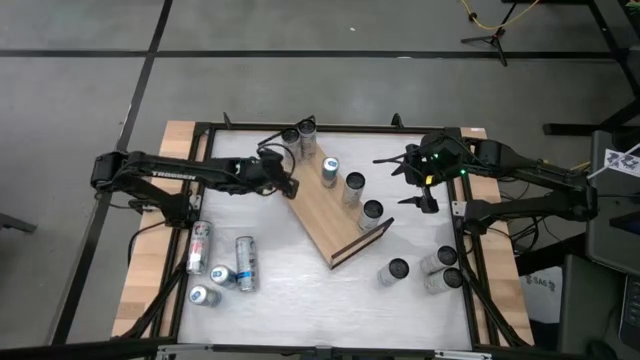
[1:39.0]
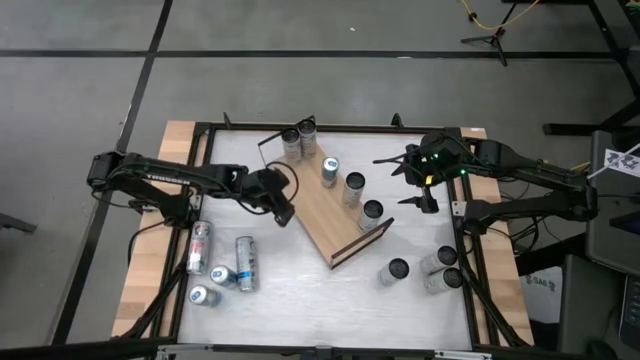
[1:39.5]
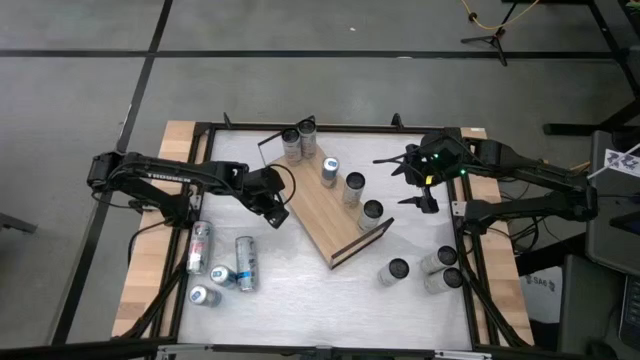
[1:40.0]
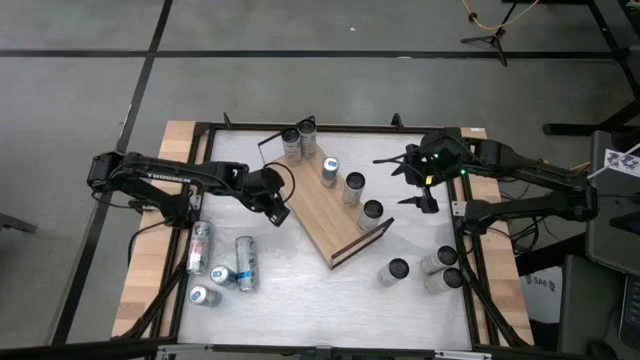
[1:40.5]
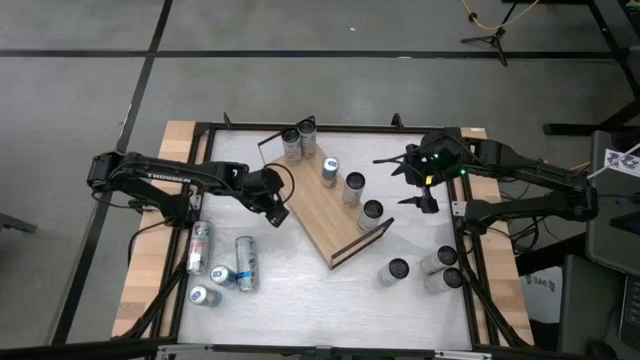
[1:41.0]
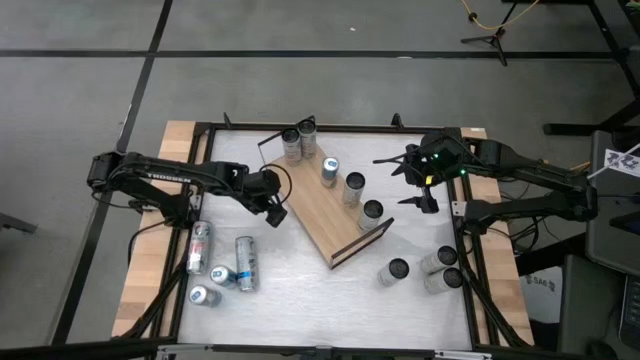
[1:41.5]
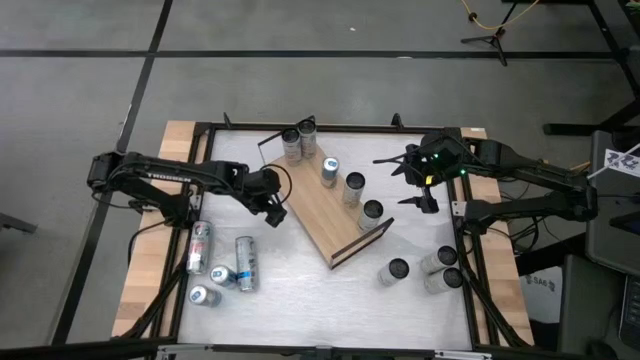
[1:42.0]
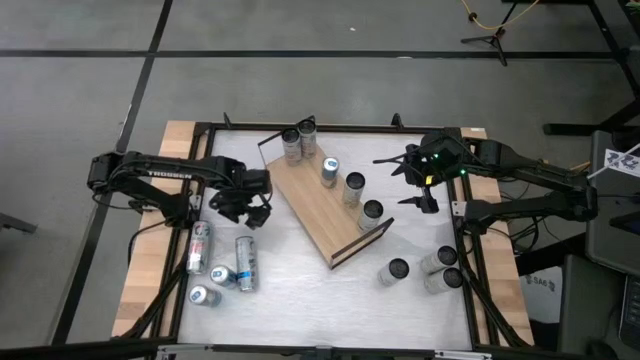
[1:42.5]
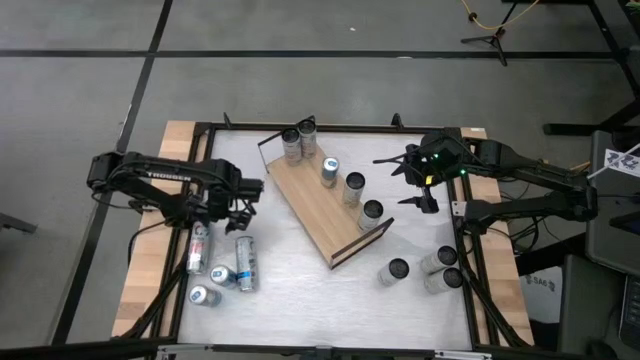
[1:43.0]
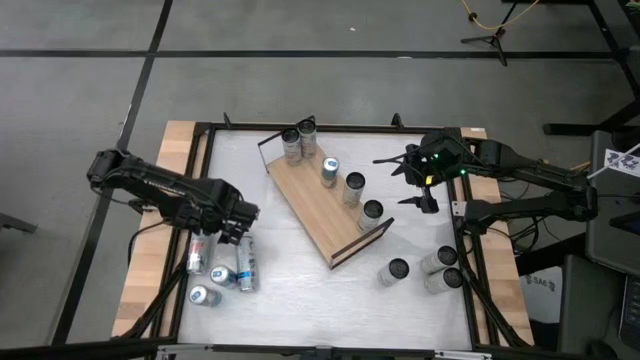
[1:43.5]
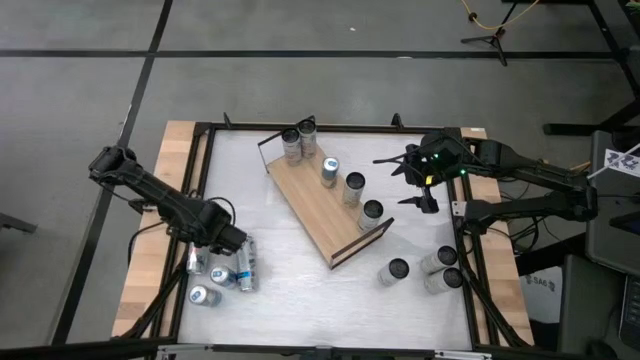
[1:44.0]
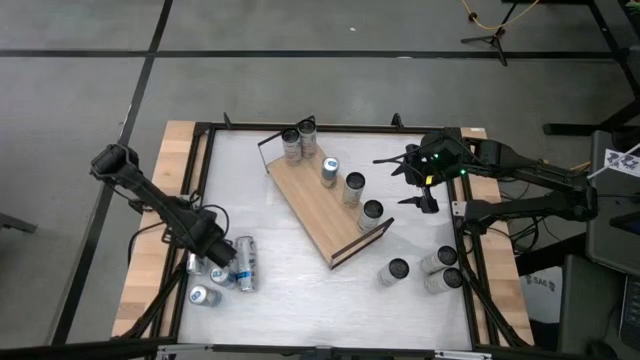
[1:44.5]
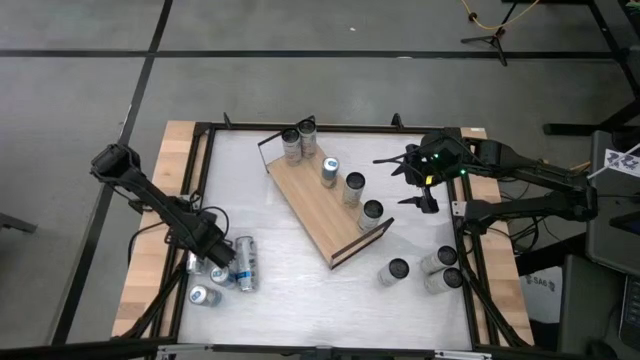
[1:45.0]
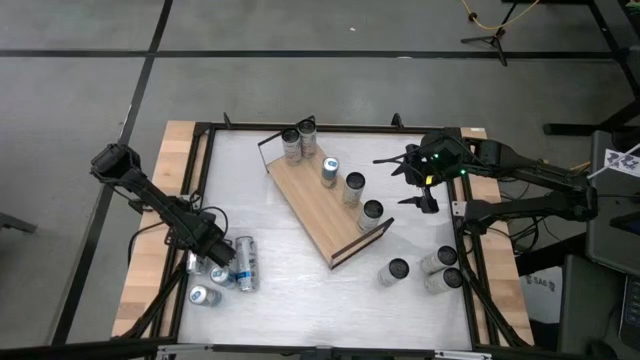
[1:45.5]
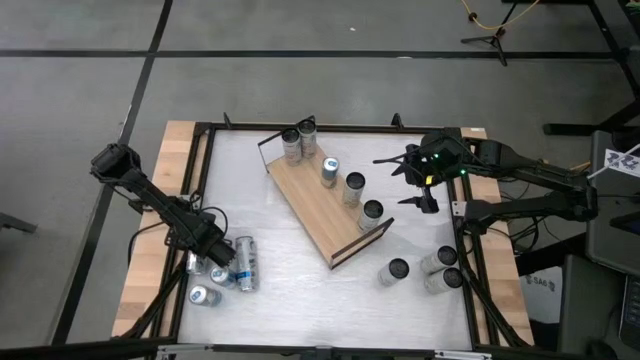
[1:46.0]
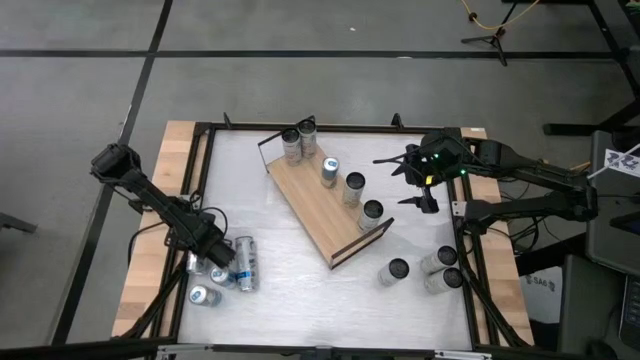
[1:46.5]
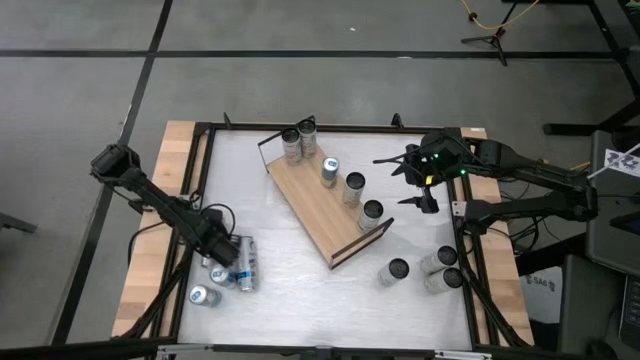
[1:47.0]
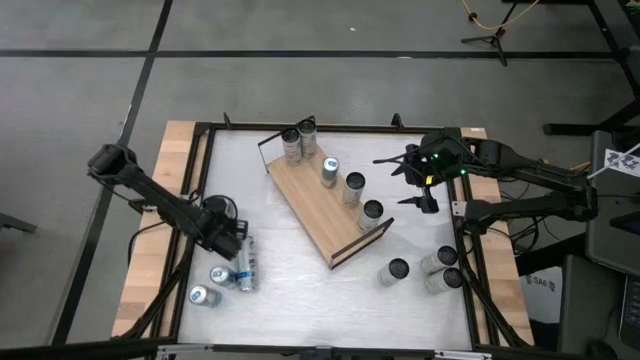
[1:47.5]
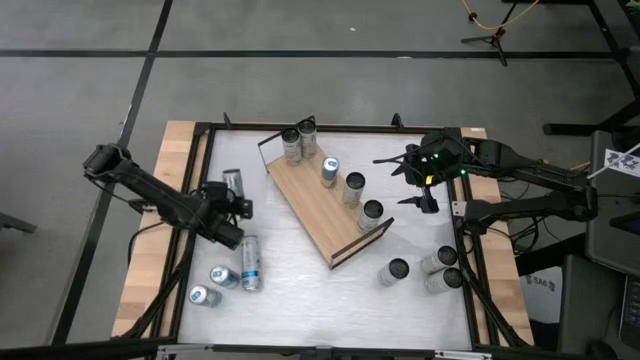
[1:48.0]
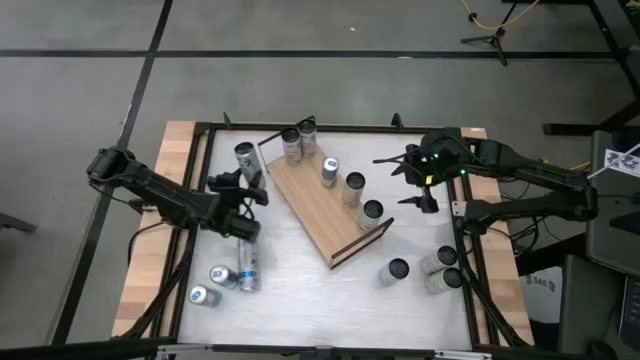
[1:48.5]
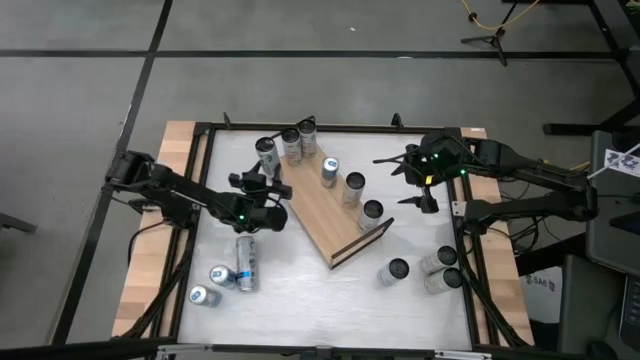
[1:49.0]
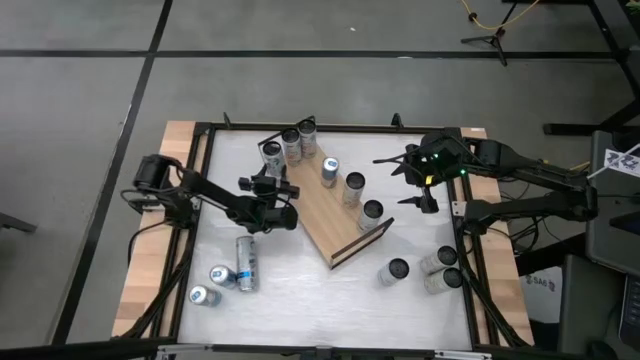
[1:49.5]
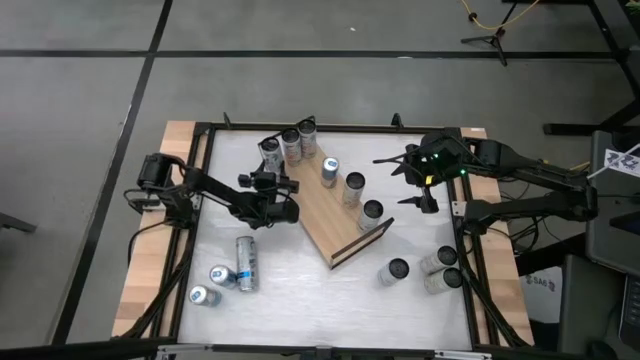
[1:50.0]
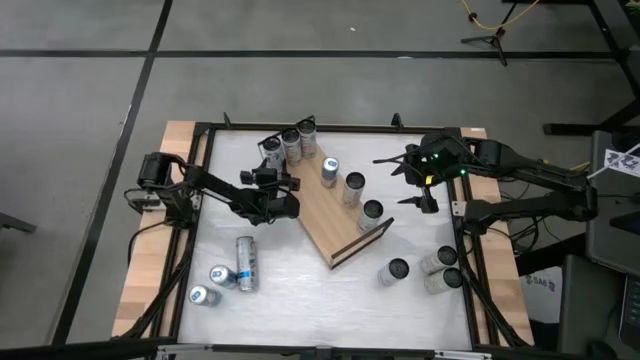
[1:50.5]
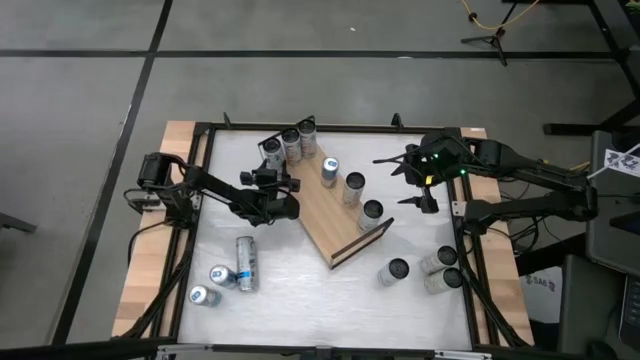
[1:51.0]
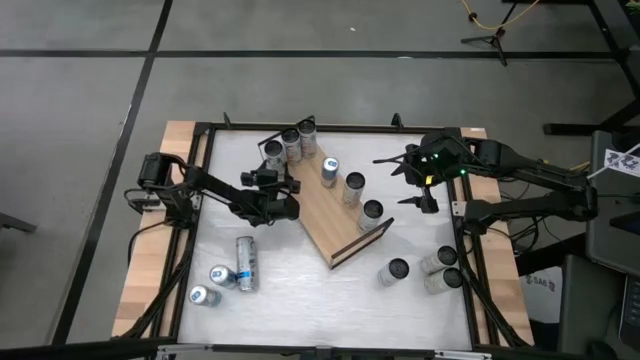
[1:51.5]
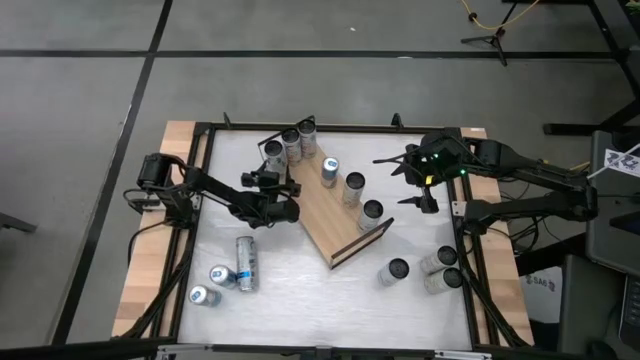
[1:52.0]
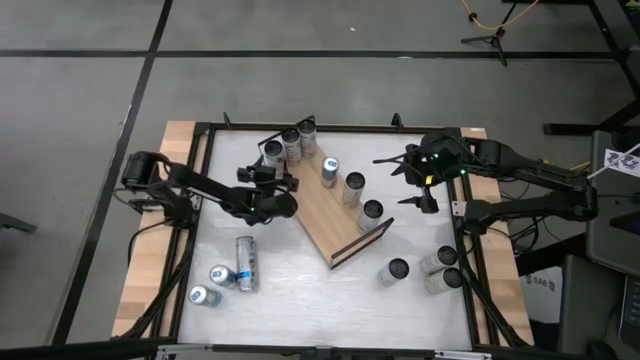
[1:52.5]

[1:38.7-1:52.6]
Task: Place canned beverage on shelf
Put the white-pink soda can on the shelf and align with the other white-pink soda can

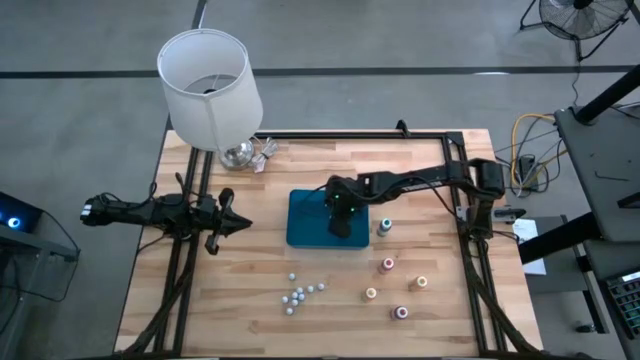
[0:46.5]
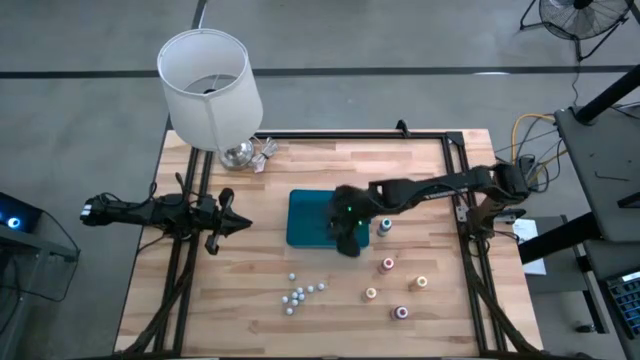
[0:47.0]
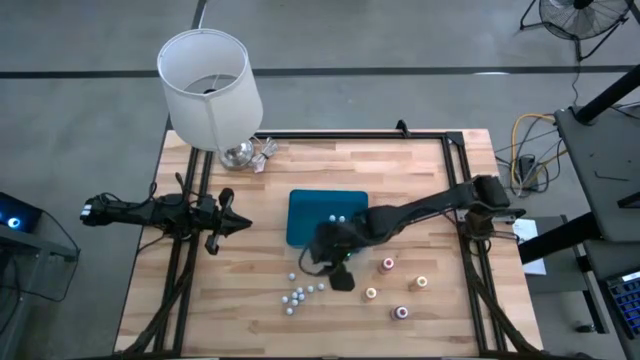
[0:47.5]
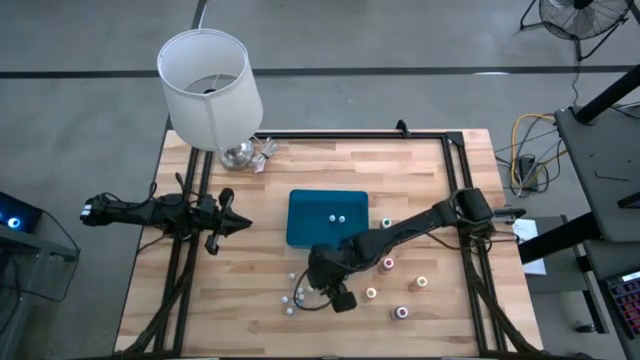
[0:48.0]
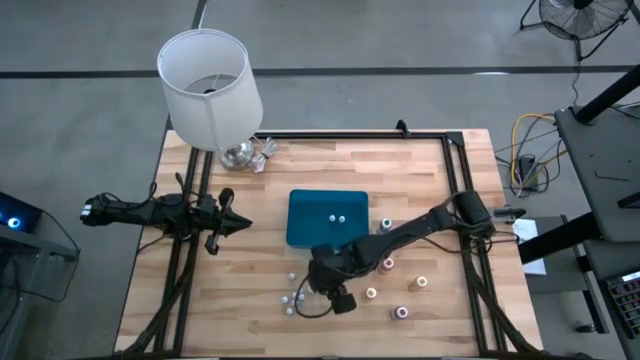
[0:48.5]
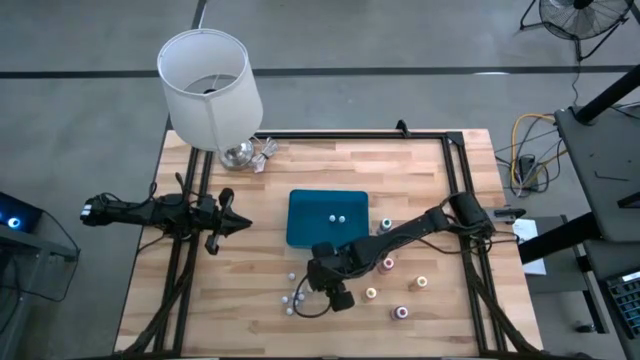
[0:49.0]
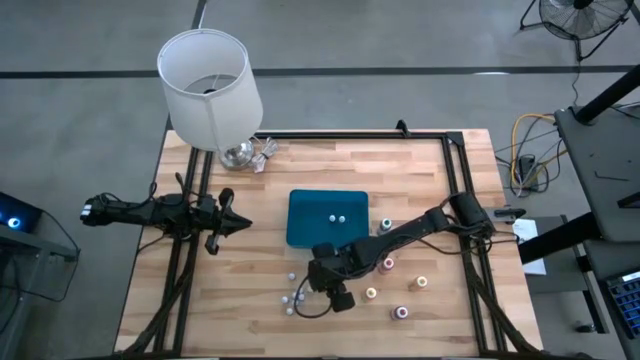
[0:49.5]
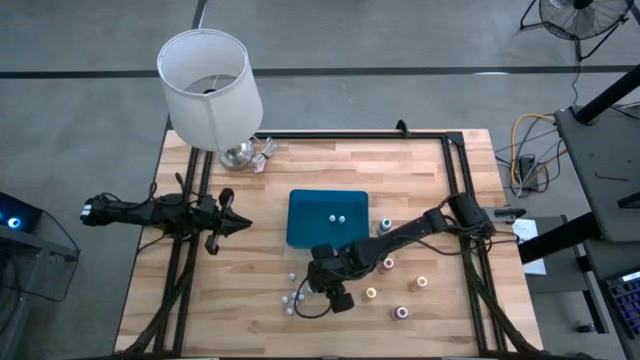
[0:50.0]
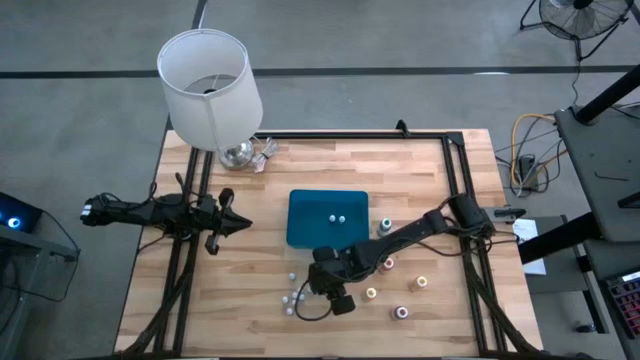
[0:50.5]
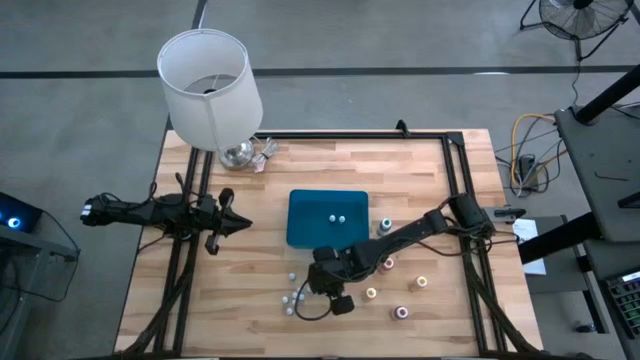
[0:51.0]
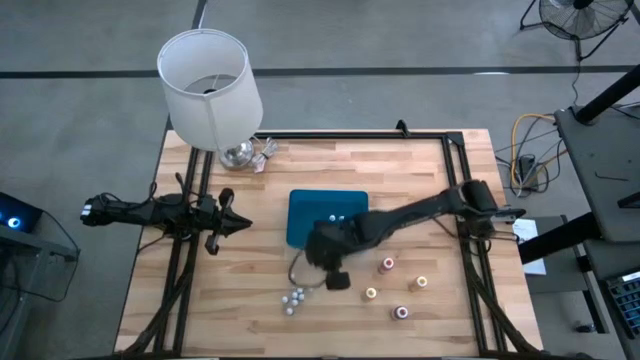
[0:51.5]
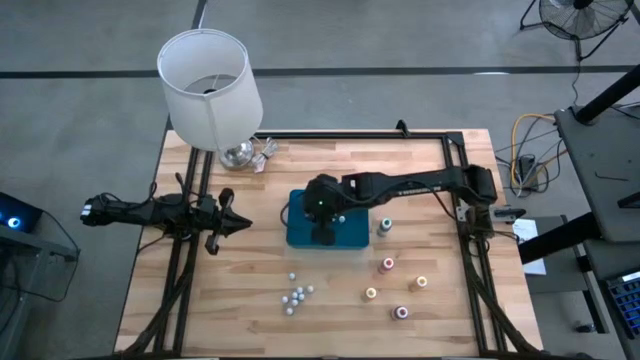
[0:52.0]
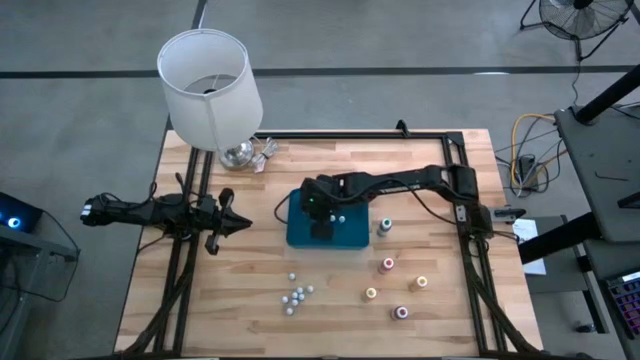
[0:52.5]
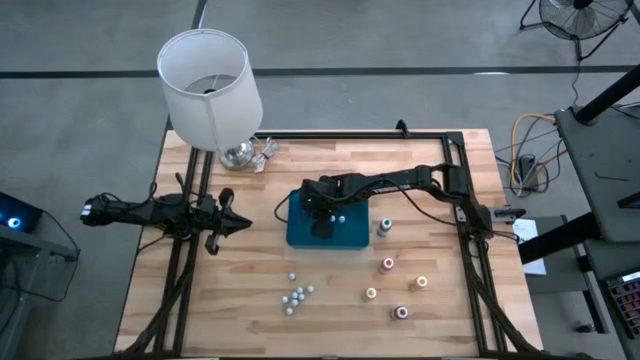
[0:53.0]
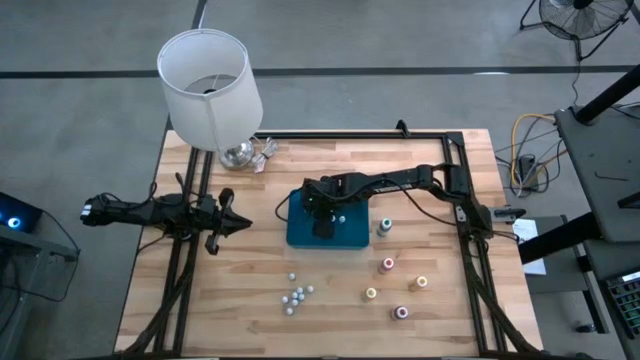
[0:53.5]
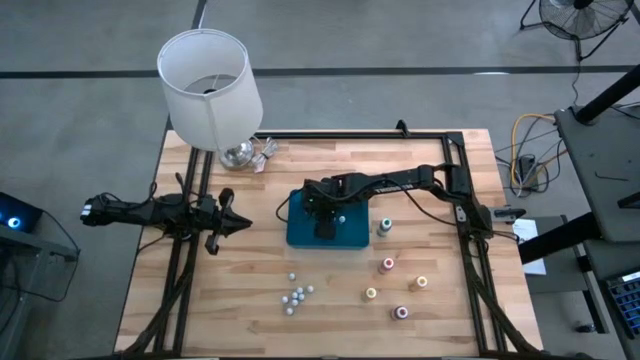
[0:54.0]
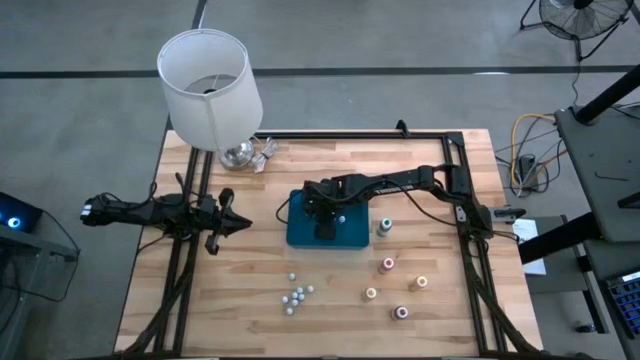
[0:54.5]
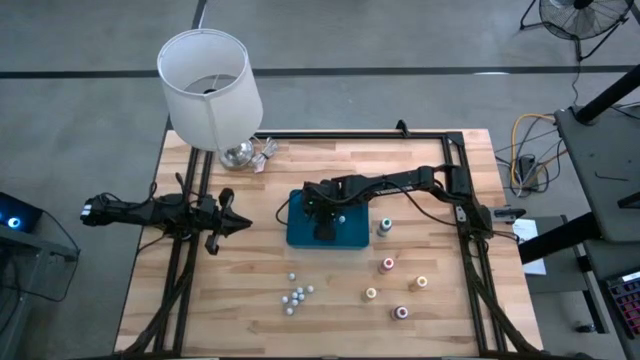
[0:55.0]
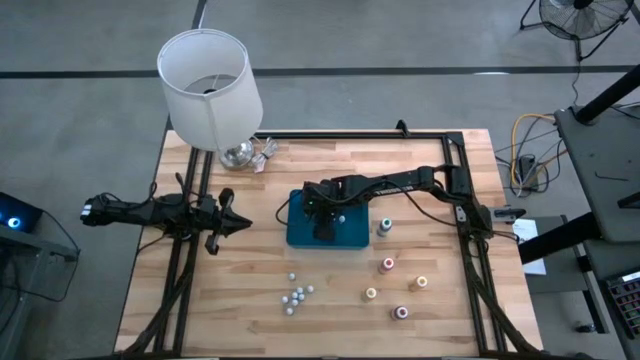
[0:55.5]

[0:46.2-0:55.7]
Task: Pick & Place food coloring
Put the top small blue food coloring bottle into the blue bin
